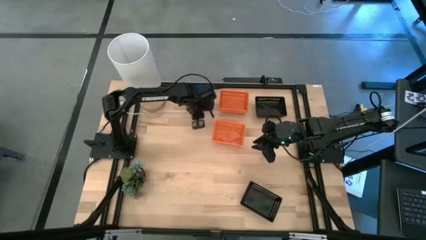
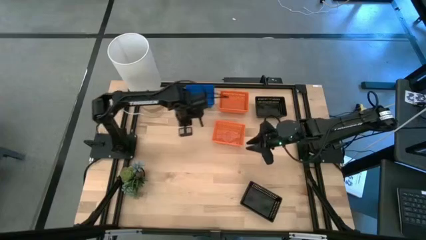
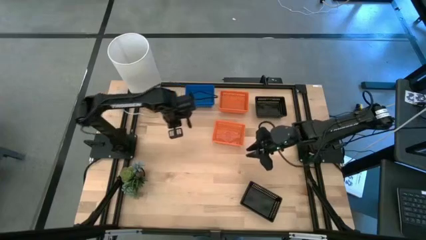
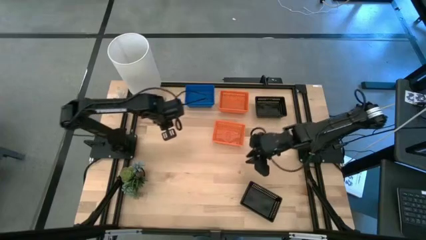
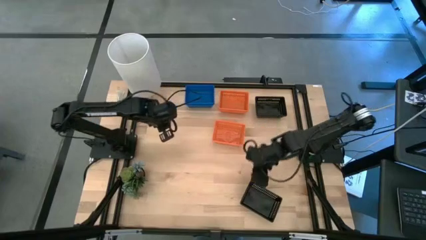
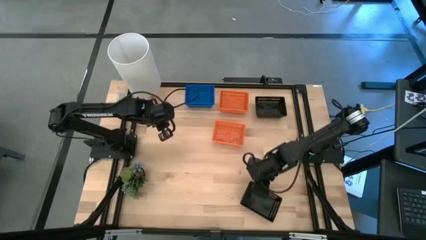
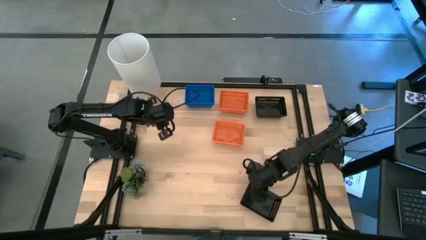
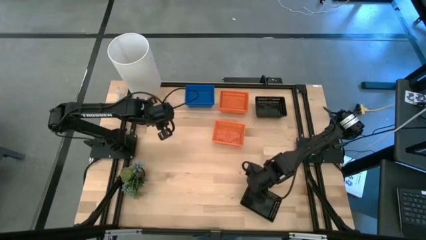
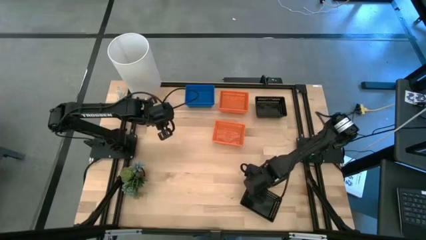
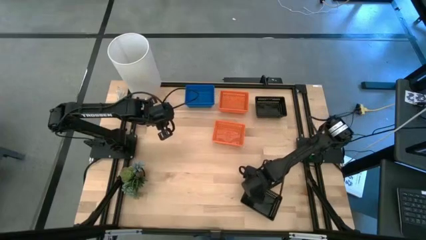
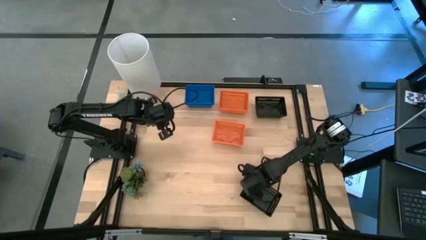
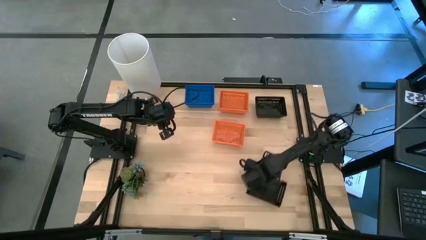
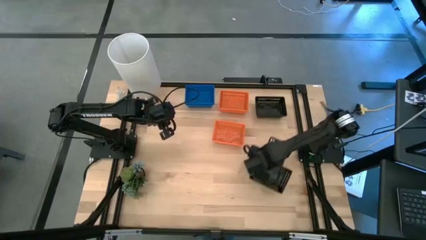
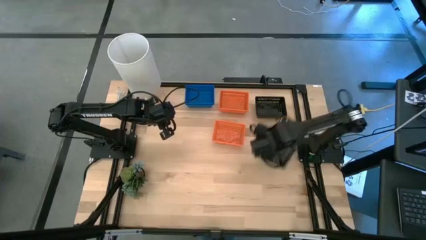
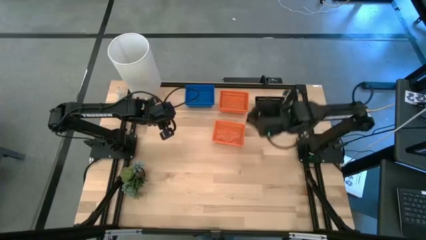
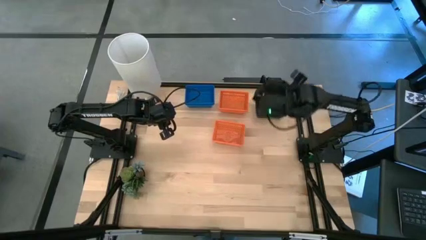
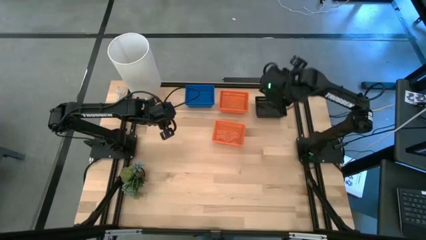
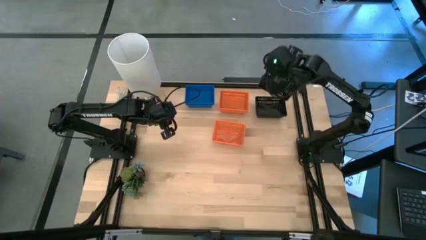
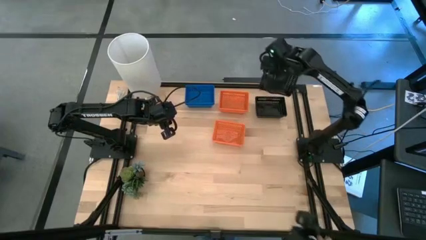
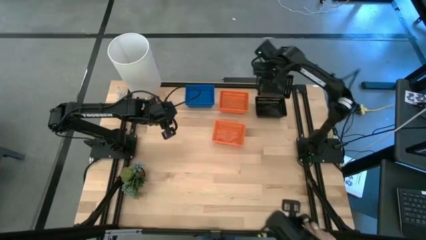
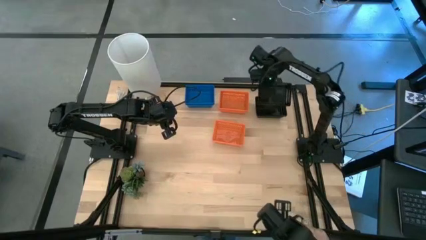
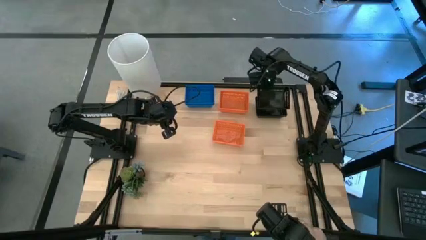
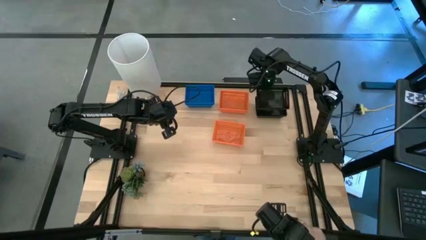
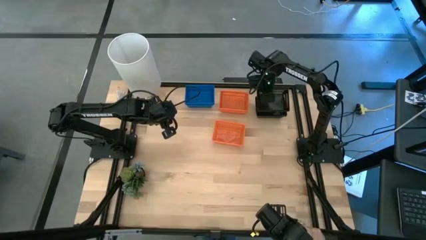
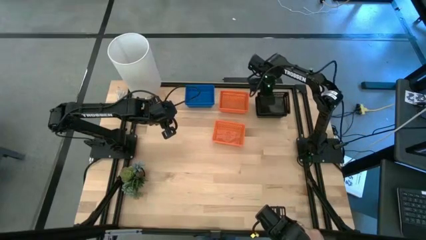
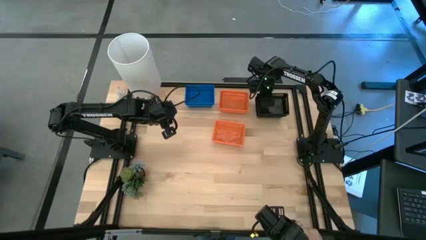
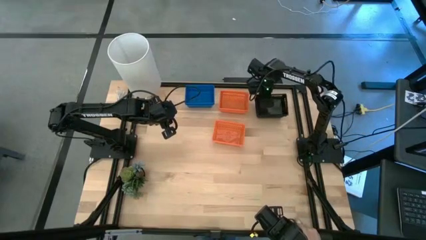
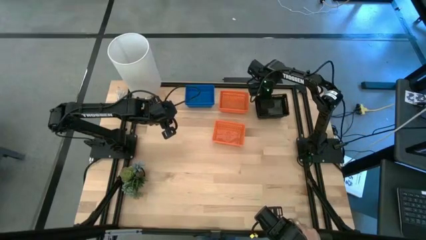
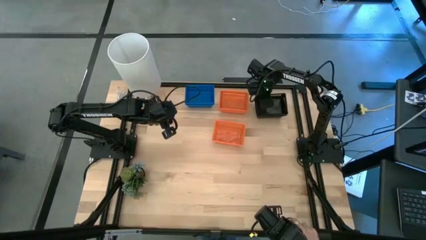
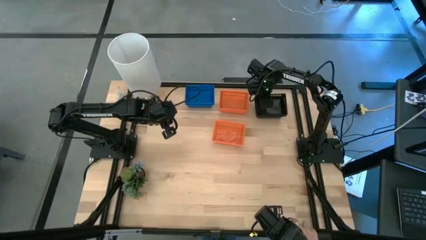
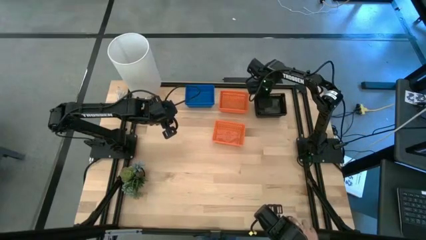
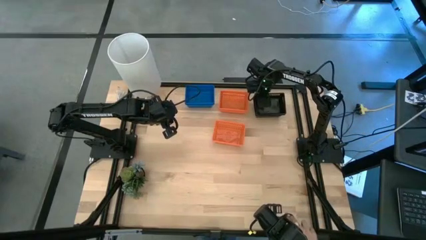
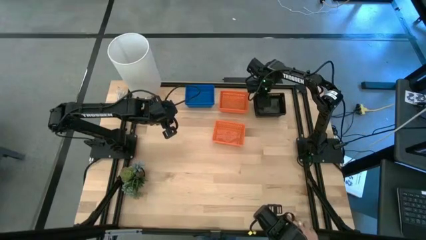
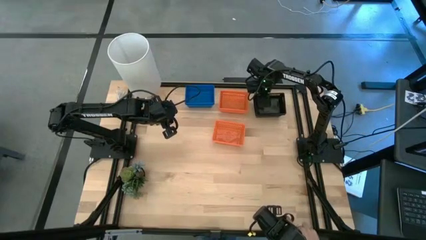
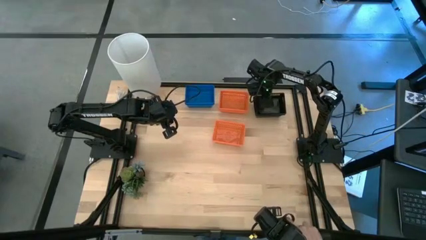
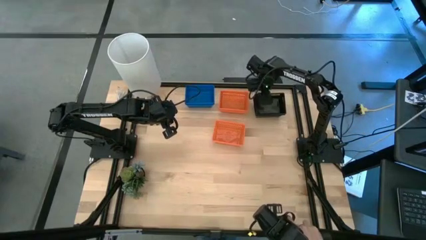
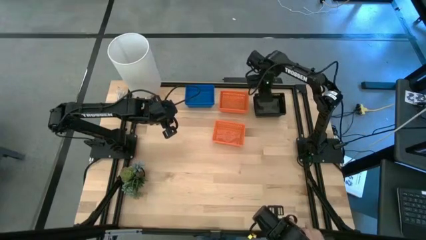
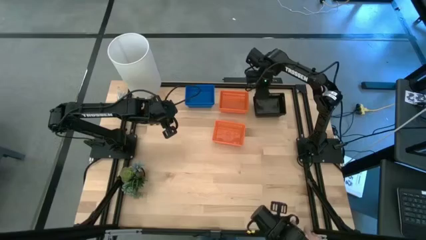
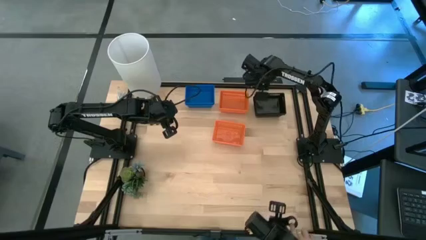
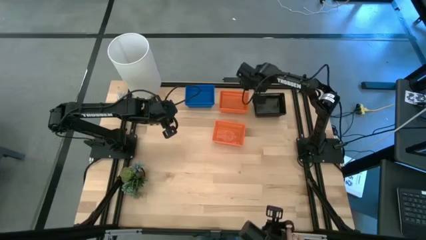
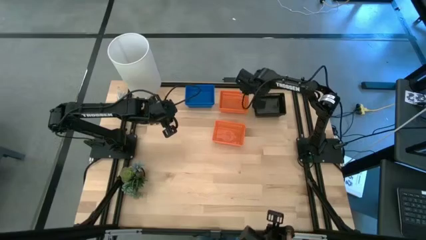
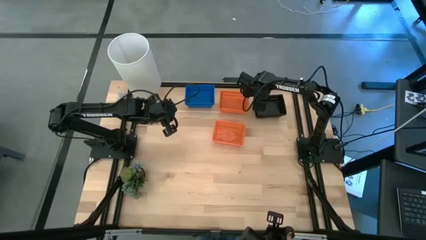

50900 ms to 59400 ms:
Stack the black bin on top of the stacked black bins

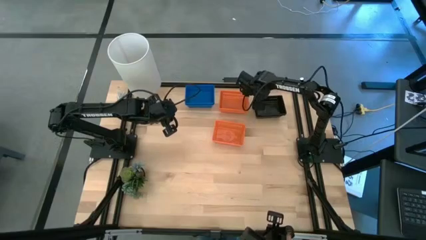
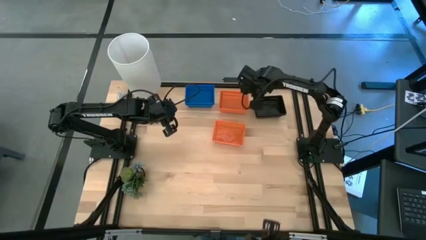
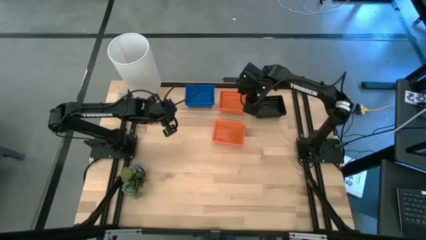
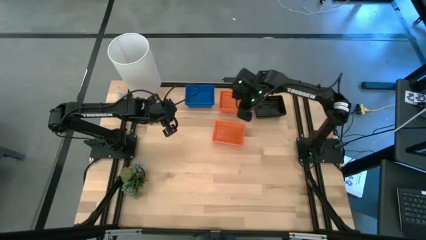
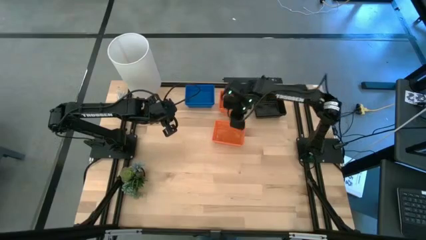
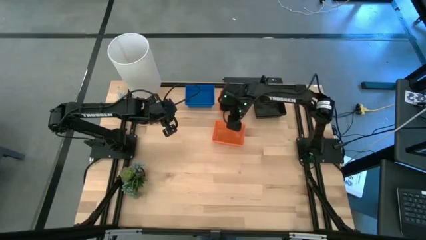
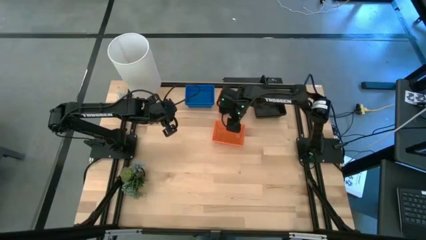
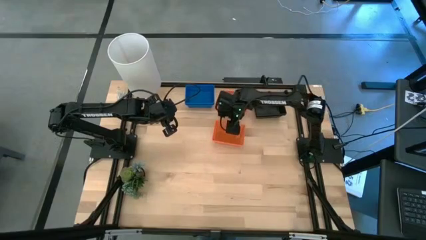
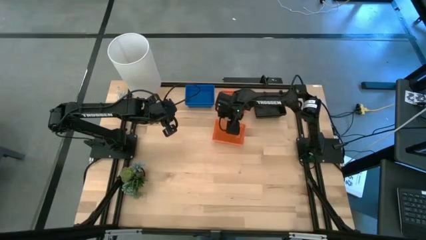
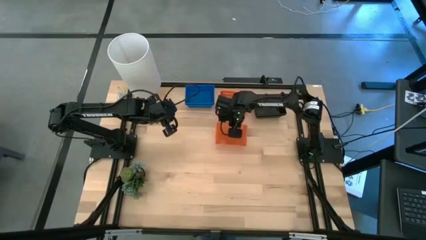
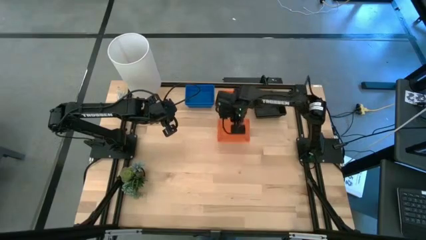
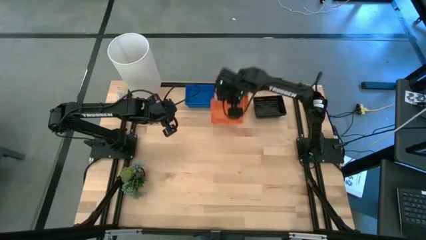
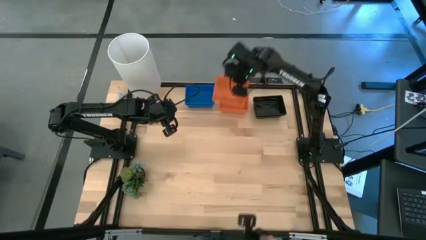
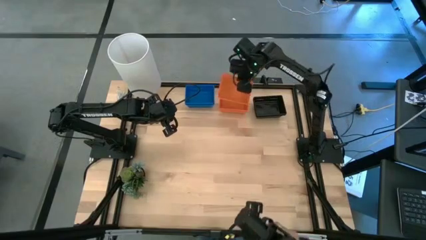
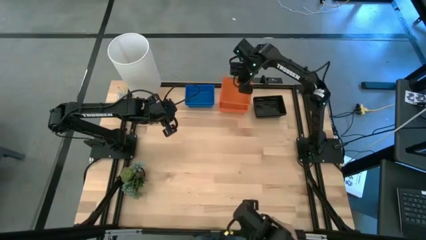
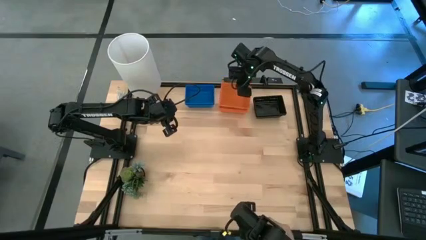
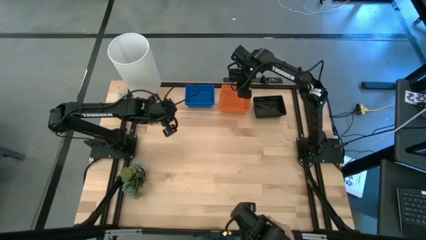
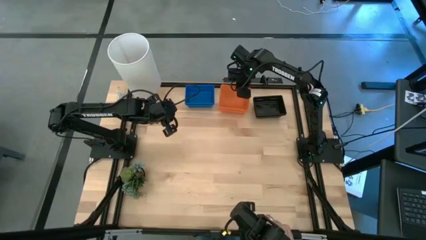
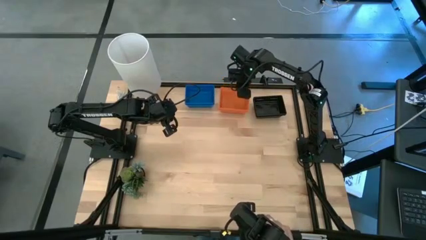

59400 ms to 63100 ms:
Stack the orange bin on top of the stacked orange bins

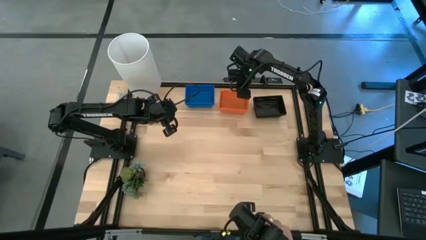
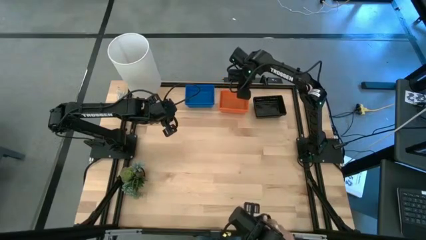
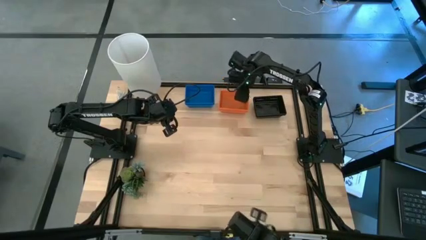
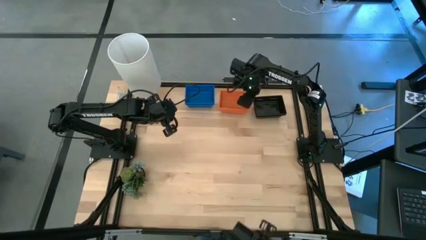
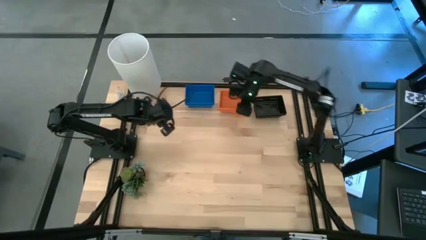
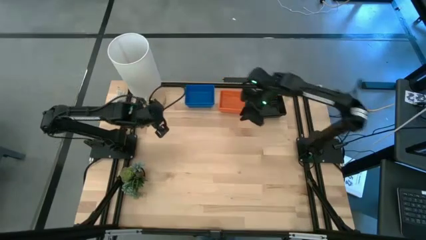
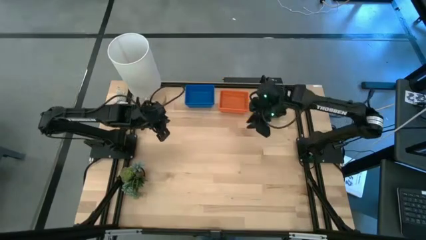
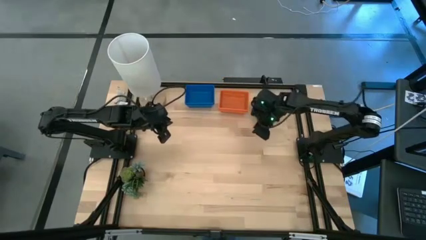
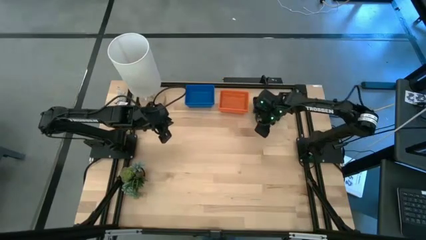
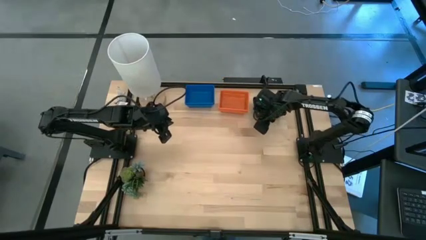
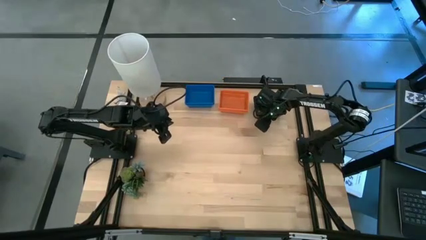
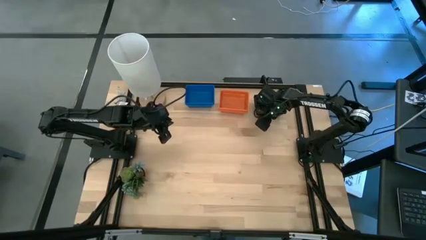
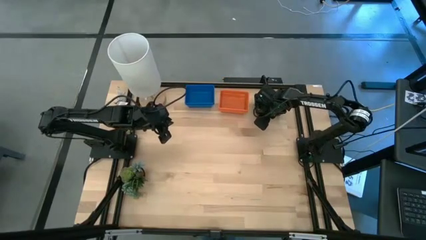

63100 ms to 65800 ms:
Adjust the stacked black bins

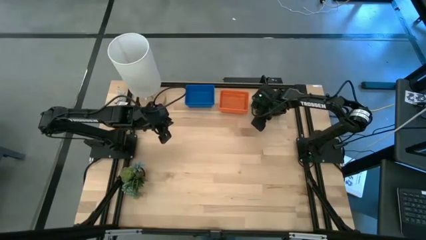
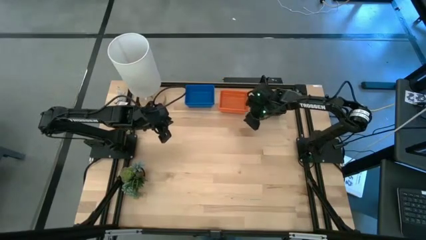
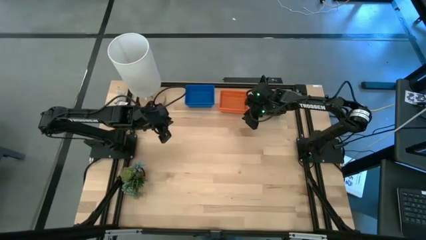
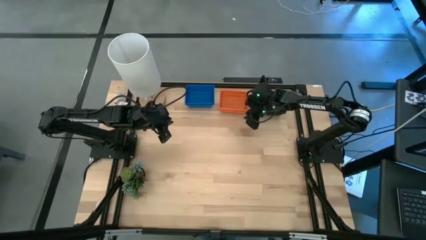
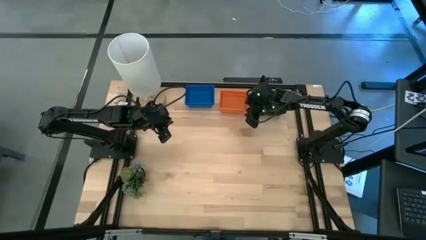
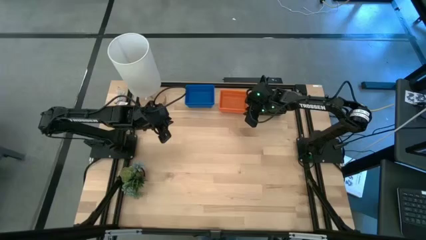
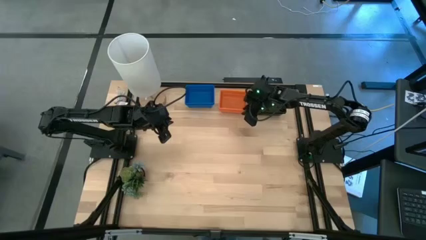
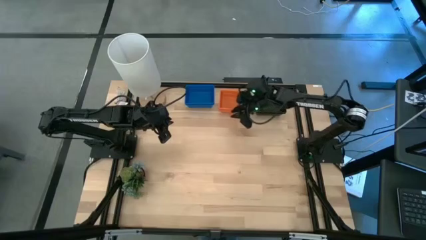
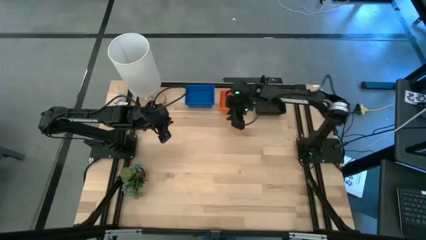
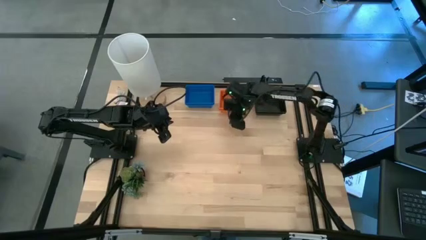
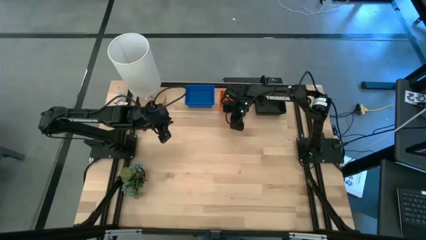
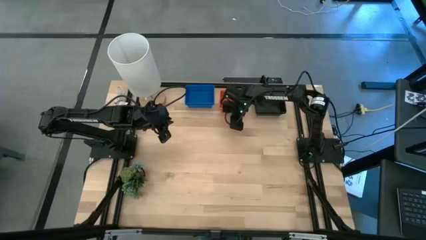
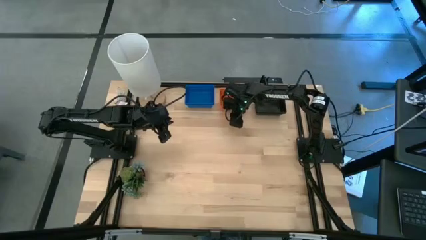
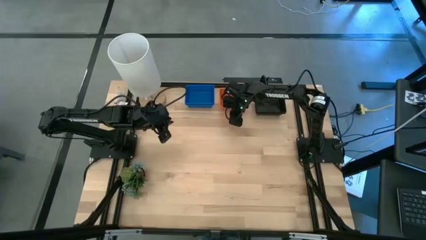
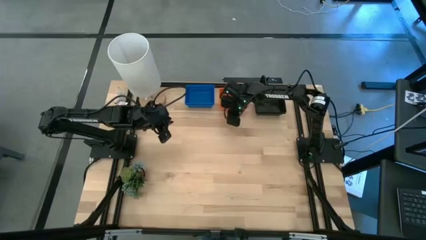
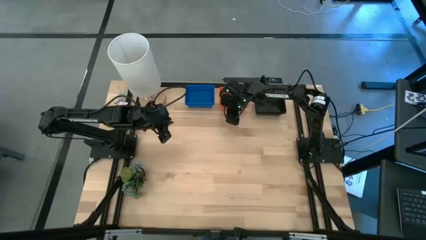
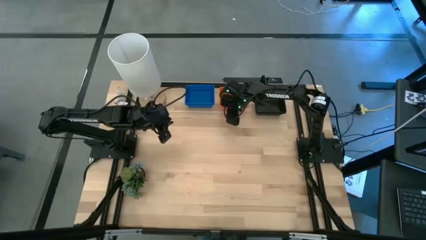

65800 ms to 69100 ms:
Adjust the stacked orange bins
